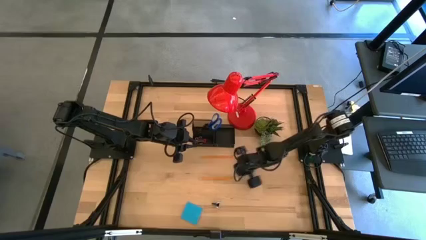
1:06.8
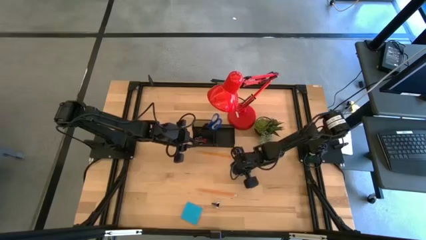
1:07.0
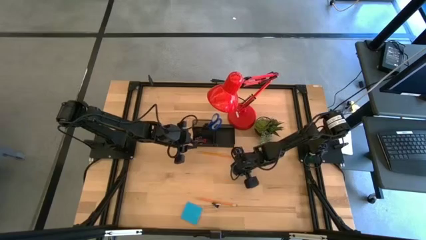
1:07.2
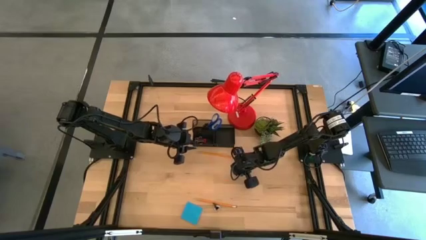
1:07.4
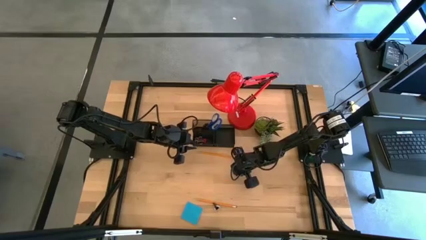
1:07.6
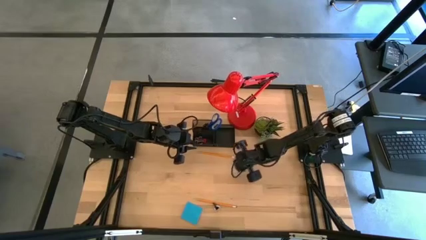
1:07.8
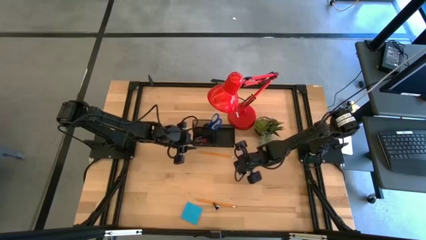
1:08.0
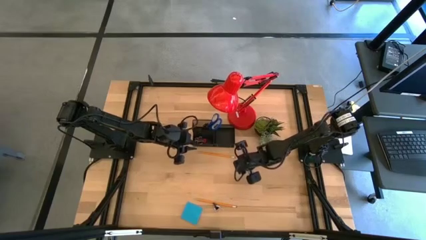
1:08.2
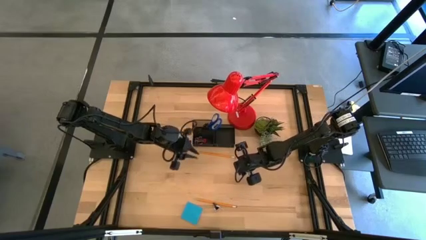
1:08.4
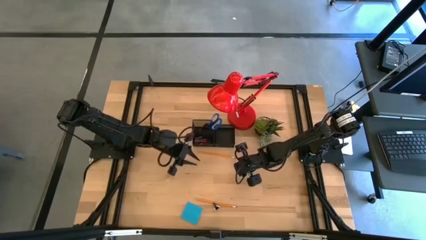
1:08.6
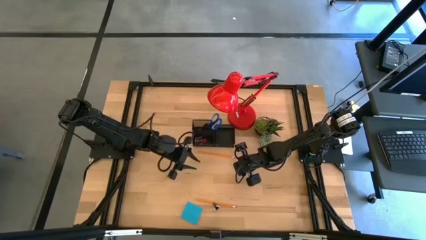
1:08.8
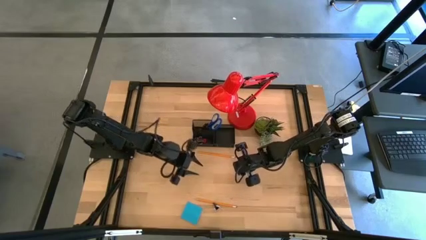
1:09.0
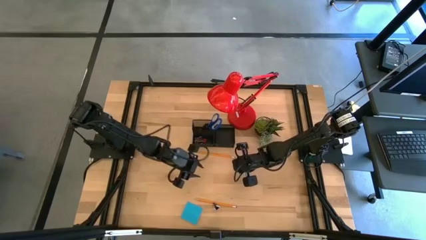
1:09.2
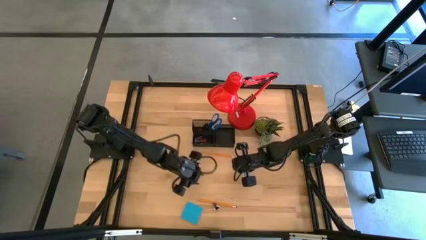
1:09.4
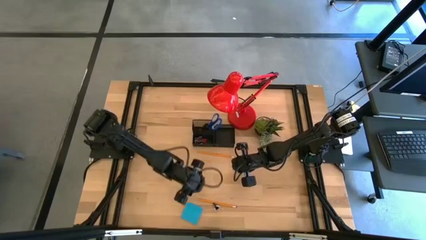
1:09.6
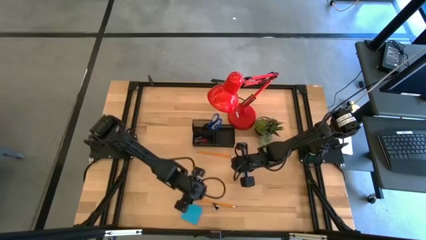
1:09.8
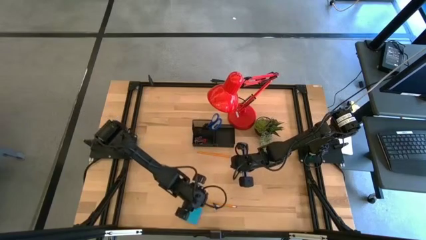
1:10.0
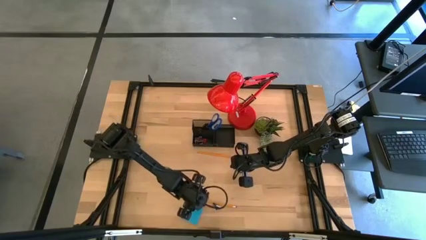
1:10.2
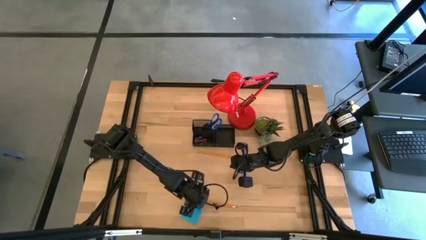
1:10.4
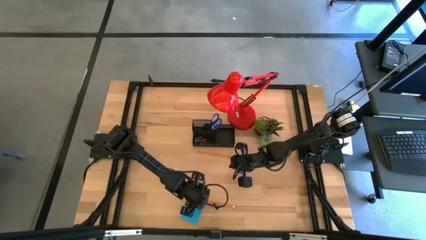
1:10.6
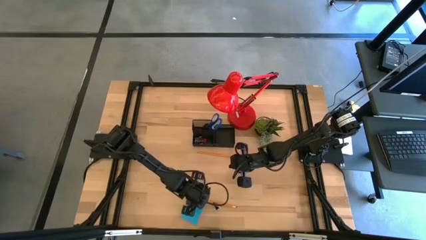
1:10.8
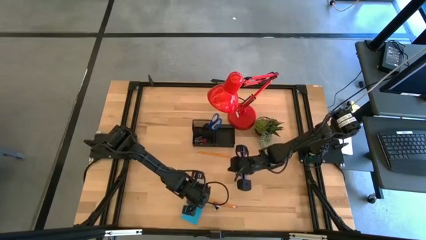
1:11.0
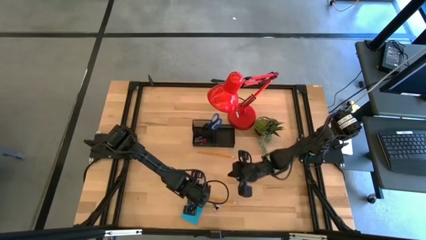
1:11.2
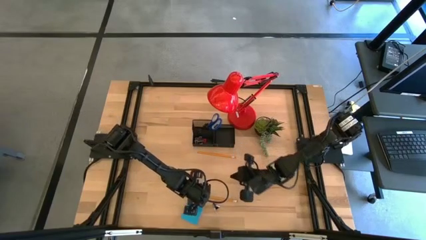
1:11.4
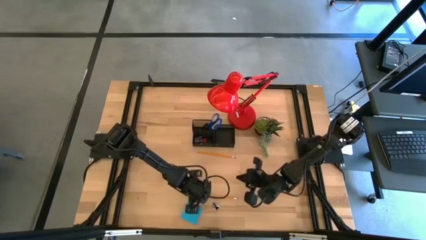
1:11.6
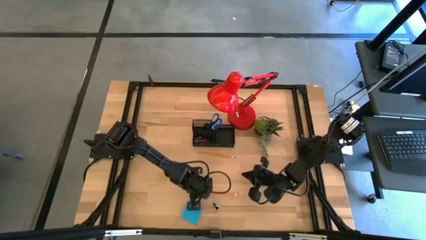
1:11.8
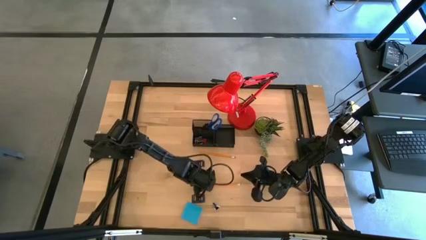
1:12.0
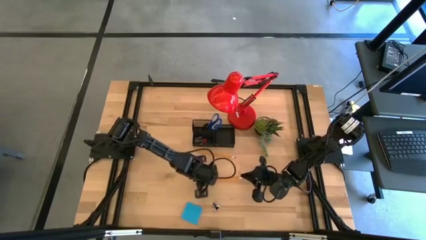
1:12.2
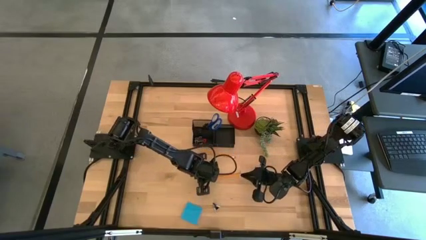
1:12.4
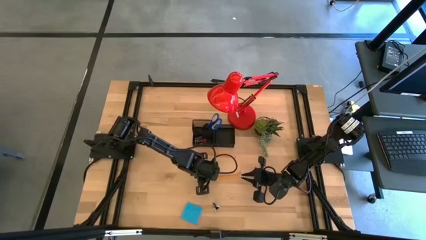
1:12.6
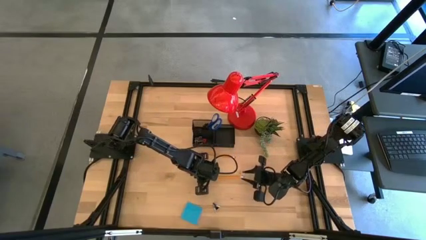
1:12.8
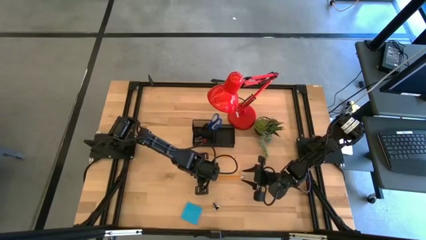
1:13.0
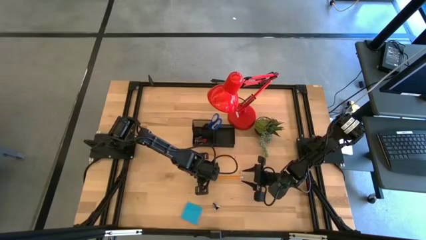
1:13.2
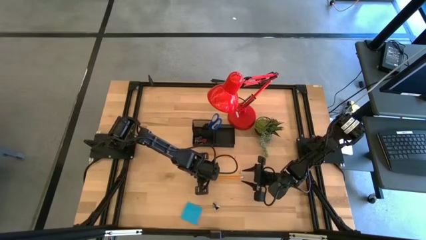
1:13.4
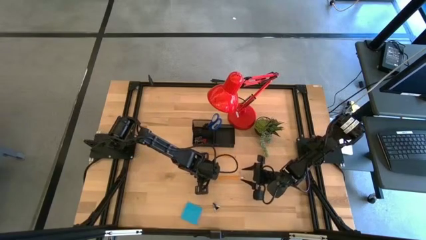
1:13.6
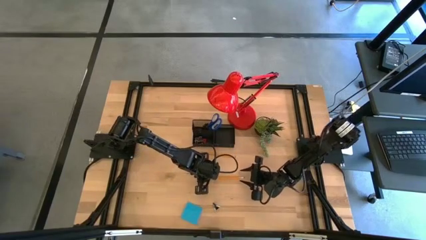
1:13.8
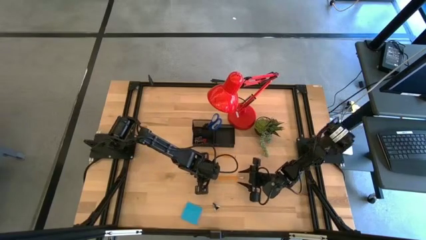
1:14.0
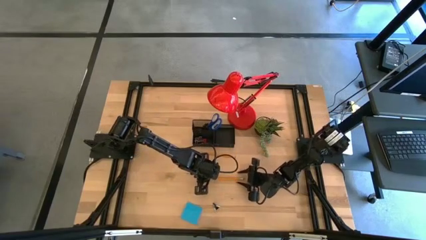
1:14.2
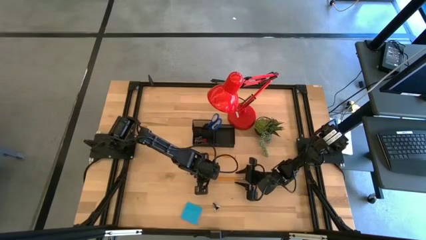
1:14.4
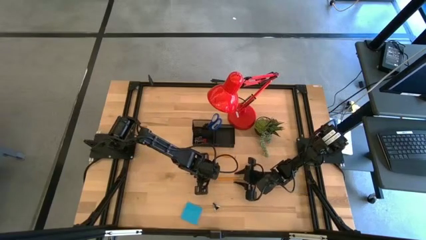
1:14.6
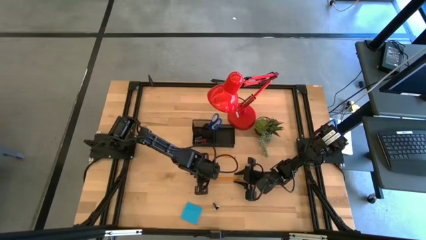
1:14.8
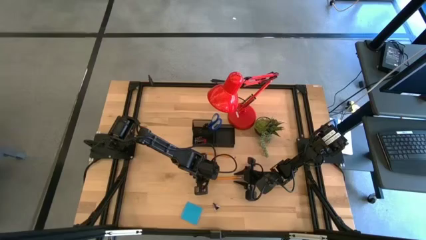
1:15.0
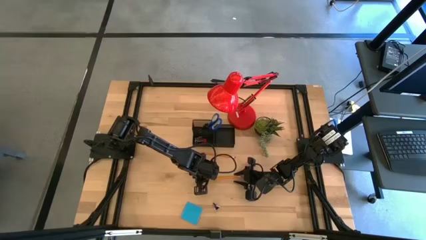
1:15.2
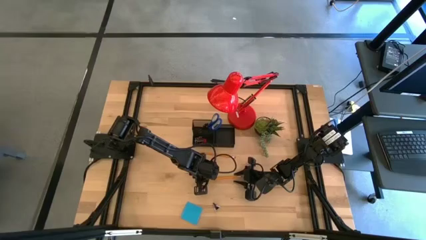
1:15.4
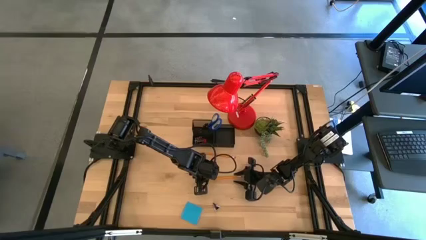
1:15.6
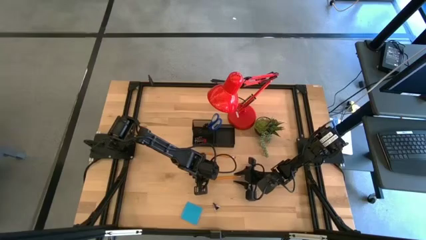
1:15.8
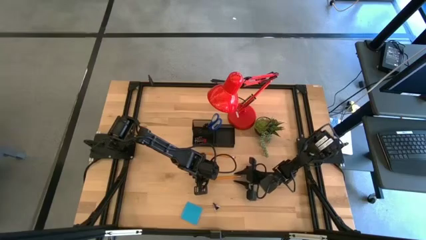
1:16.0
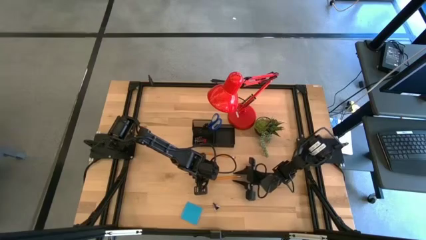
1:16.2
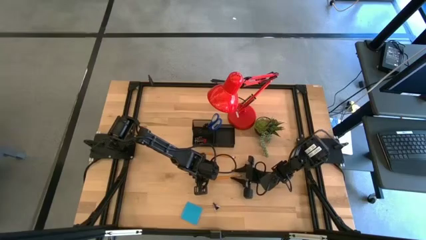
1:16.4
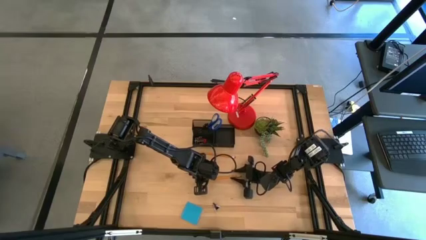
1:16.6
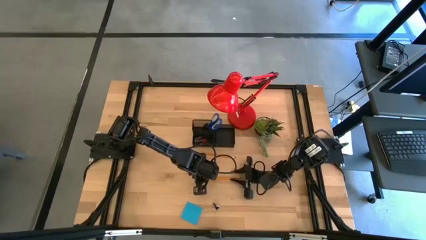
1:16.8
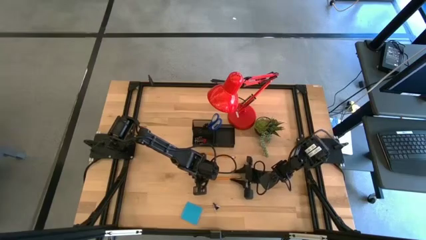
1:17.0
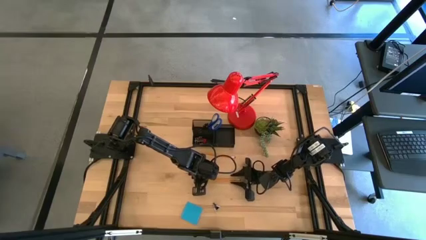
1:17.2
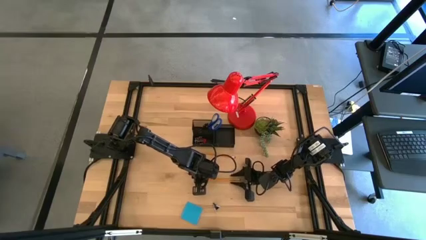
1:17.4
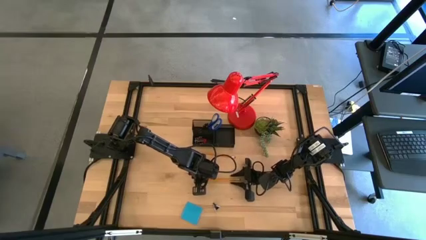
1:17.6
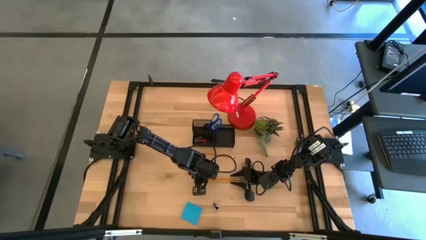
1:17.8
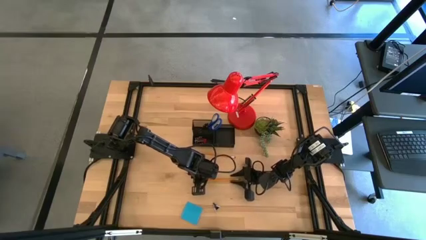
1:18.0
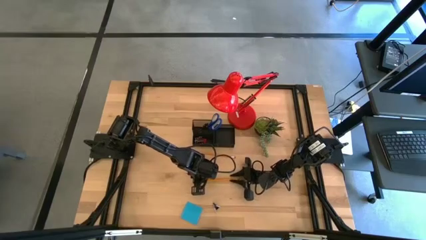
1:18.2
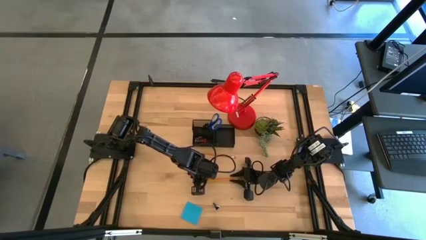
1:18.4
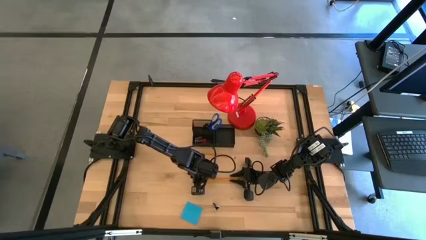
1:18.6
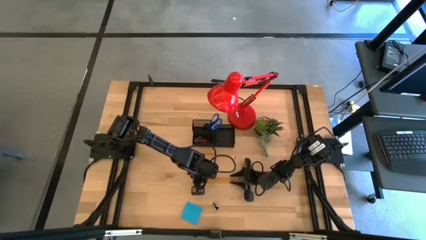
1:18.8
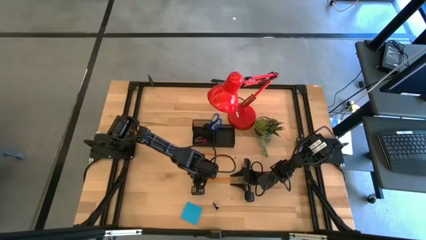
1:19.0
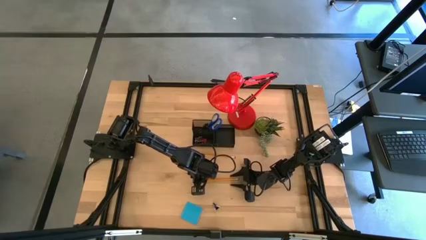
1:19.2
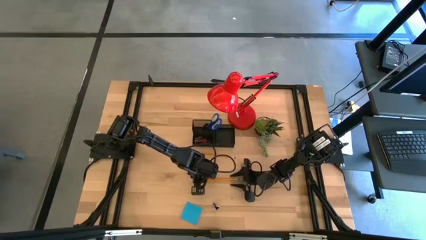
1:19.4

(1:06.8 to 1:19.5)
Task: Pick and place office supplies into organizer
Put the bottom orange pencil into the black desk organizer

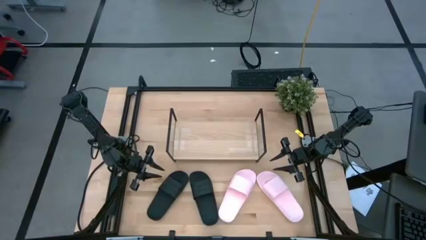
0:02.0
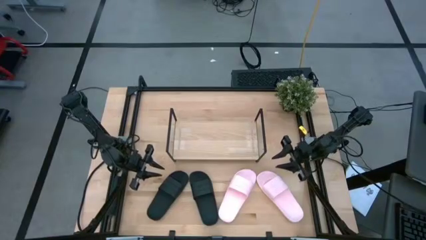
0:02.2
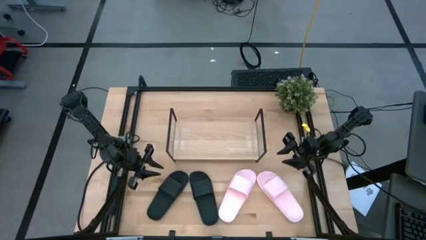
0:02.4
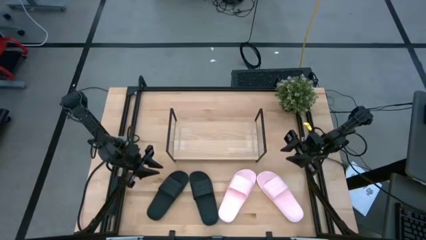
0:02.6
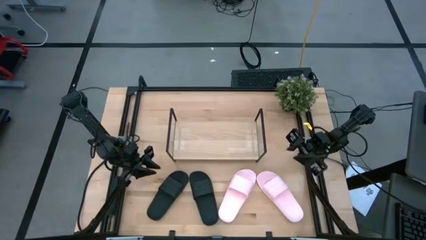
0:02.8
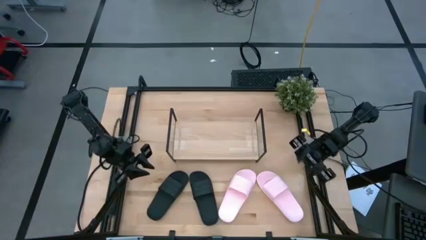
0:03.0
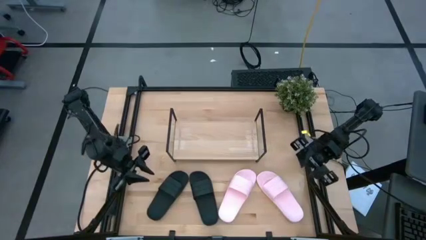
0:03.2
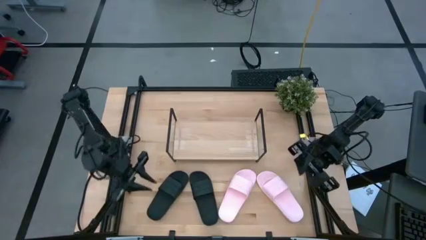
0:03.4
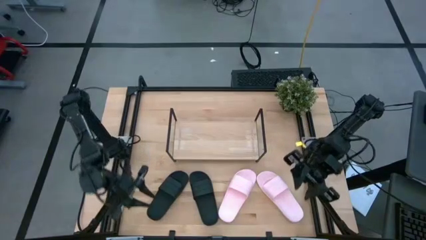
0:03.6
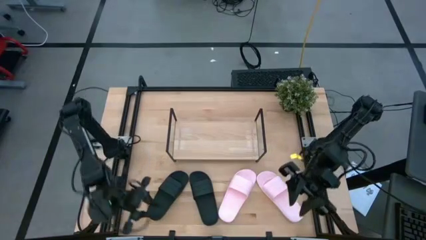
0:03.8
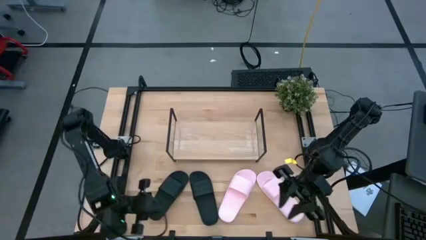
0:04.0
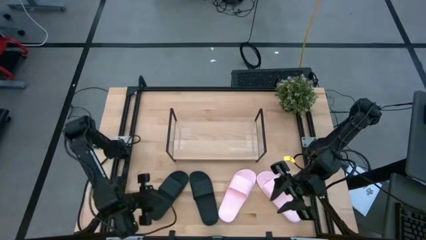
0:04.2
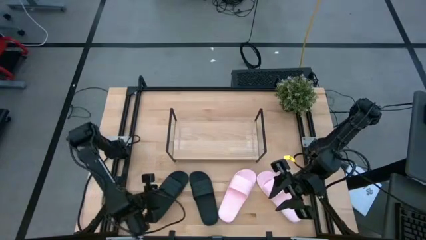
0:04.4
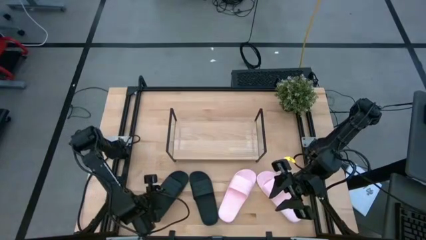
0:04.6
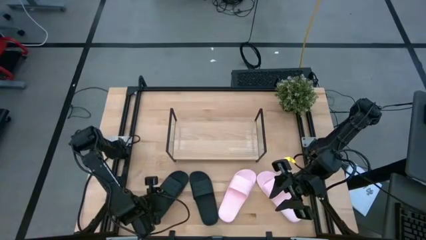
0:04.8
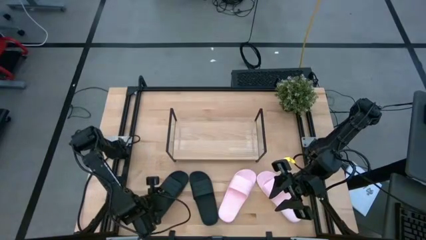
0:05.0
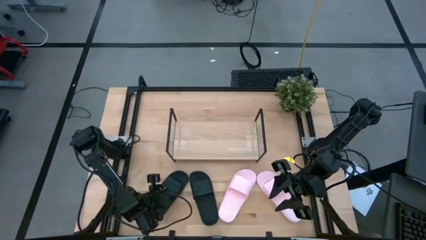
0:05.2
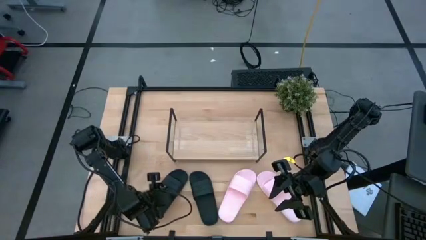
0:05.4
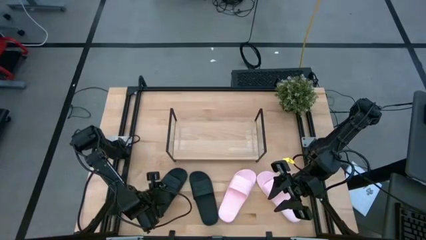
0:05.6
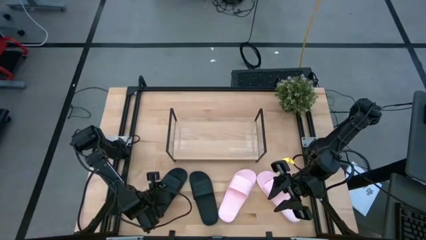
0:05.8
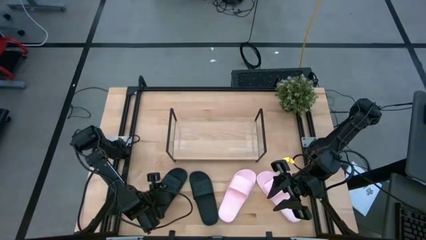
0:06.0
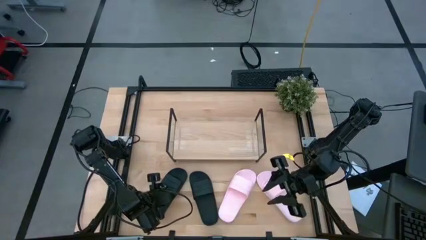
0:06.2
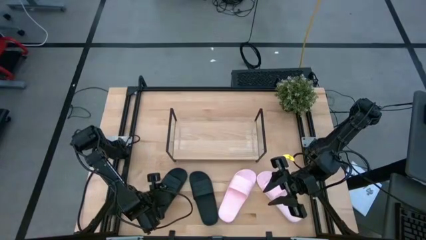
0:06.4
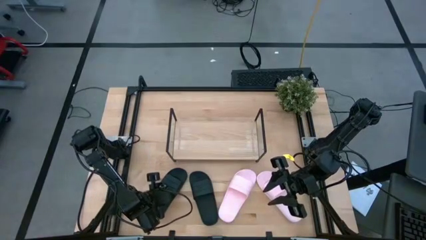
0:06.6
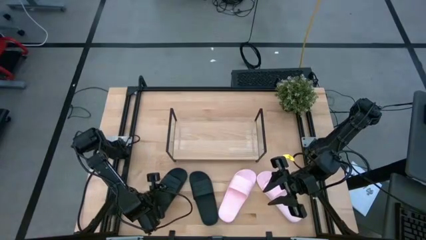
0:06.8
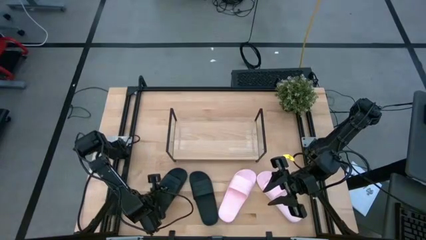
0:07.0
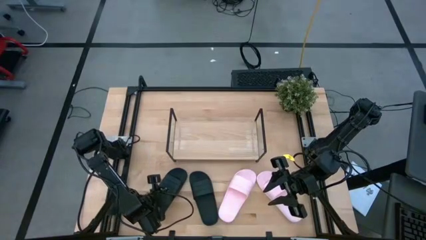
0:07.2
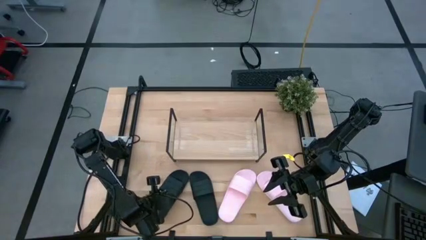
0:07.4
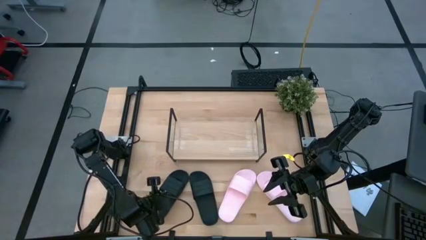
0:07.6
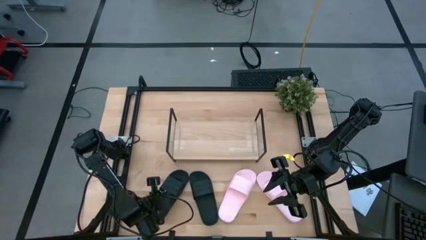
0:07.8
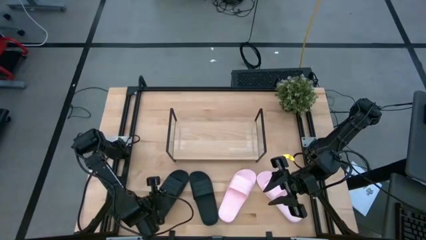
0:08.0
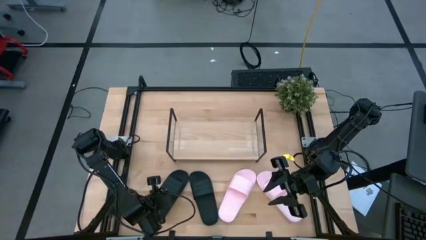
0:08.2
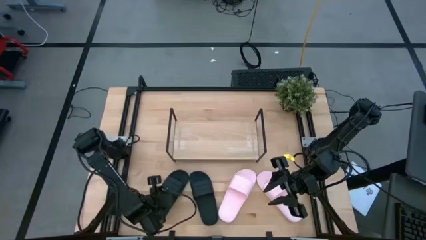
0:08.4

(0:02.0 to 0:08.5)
Task: Pick and place slides into the shelf
Put the left black slipper on the shelf
